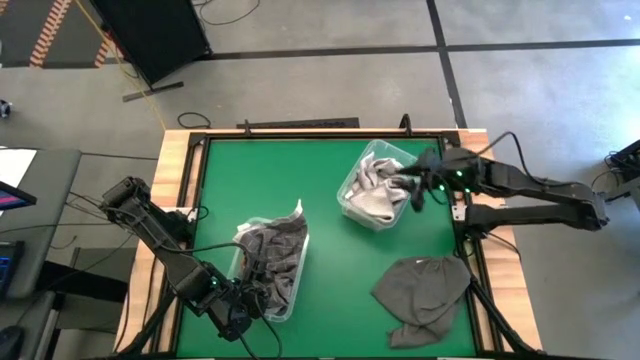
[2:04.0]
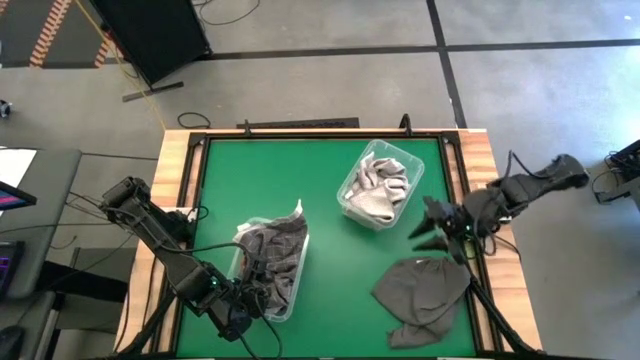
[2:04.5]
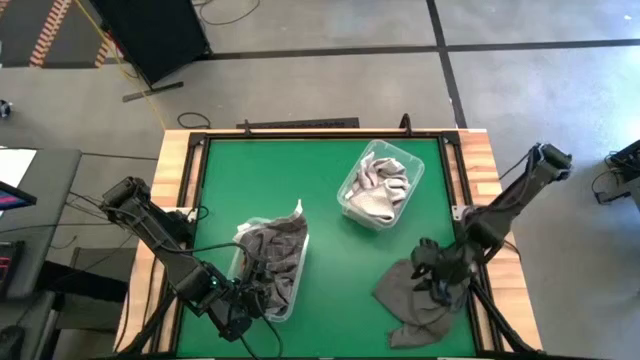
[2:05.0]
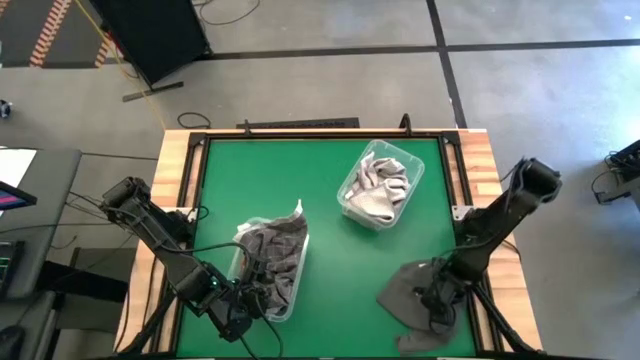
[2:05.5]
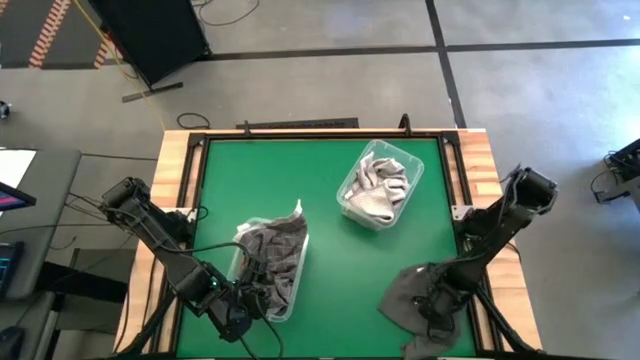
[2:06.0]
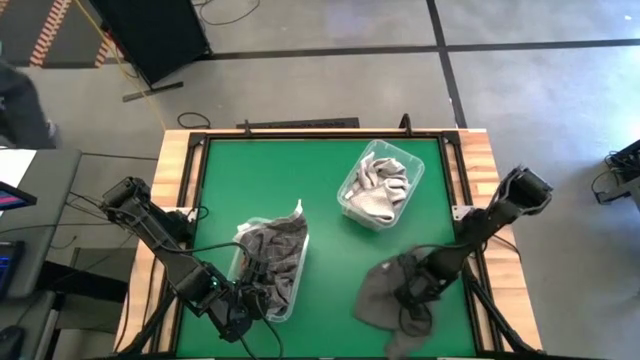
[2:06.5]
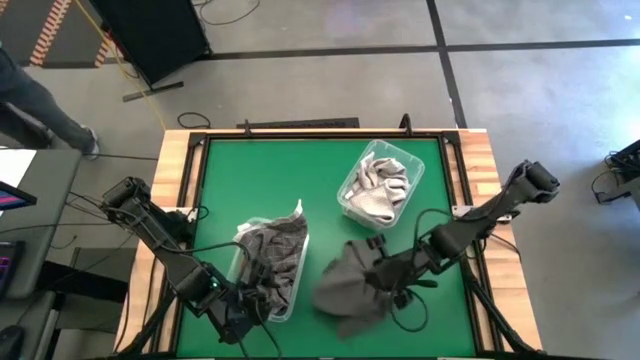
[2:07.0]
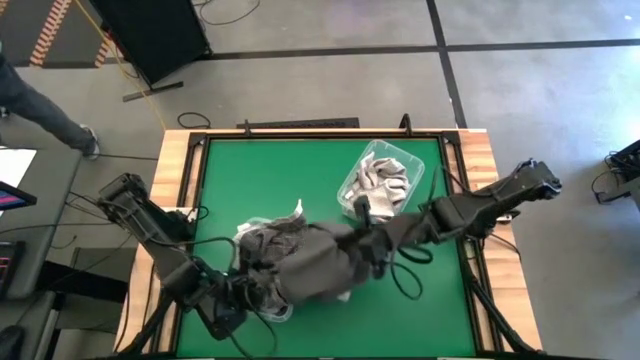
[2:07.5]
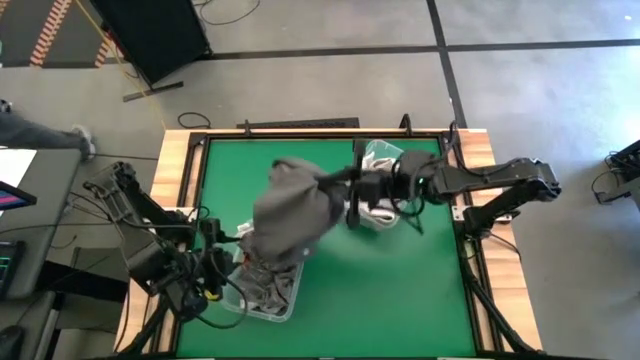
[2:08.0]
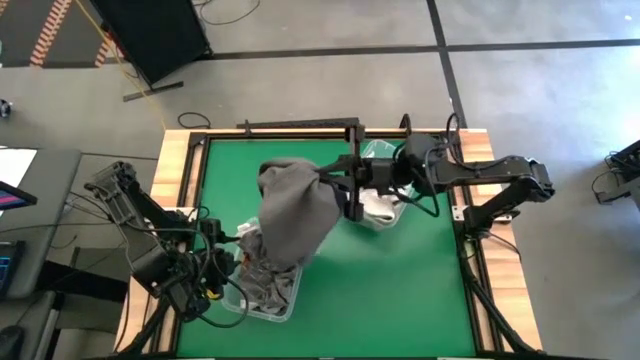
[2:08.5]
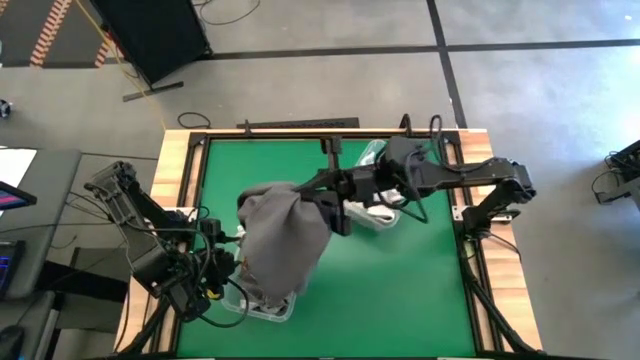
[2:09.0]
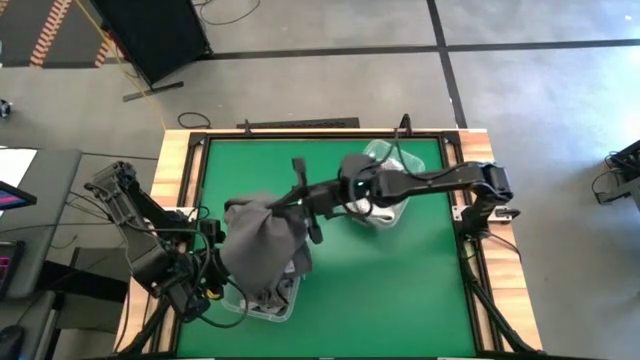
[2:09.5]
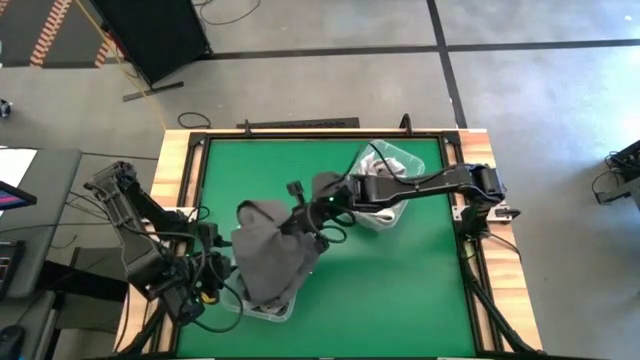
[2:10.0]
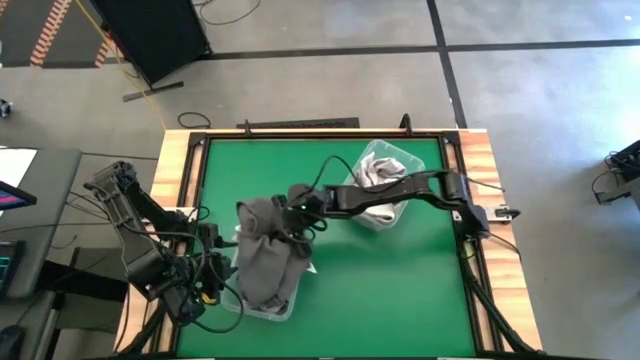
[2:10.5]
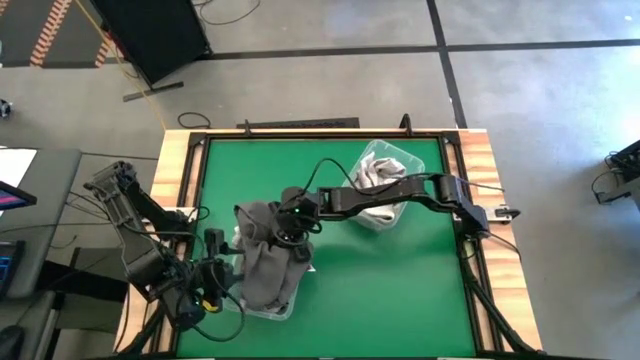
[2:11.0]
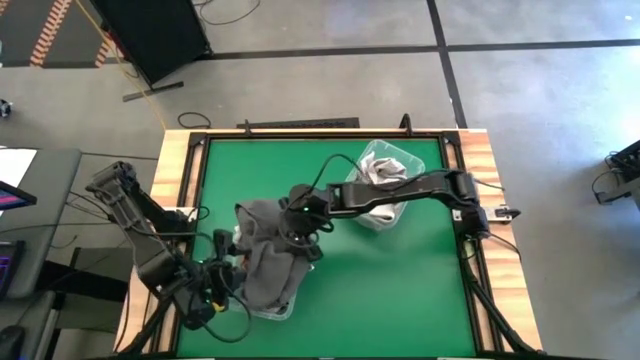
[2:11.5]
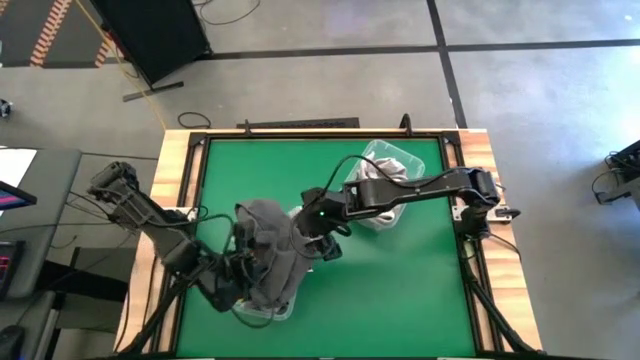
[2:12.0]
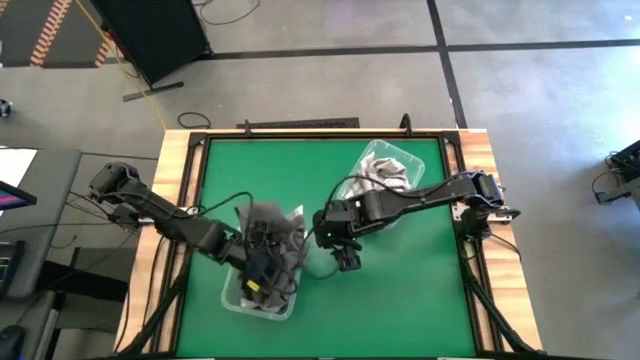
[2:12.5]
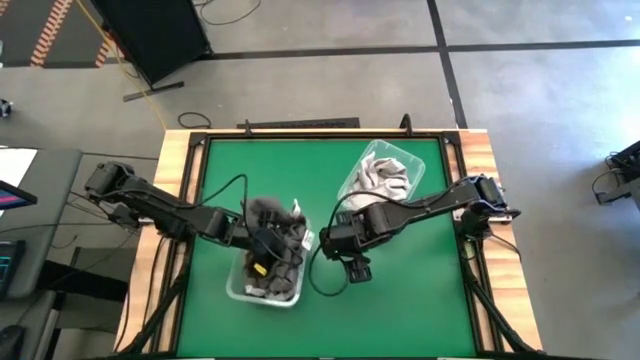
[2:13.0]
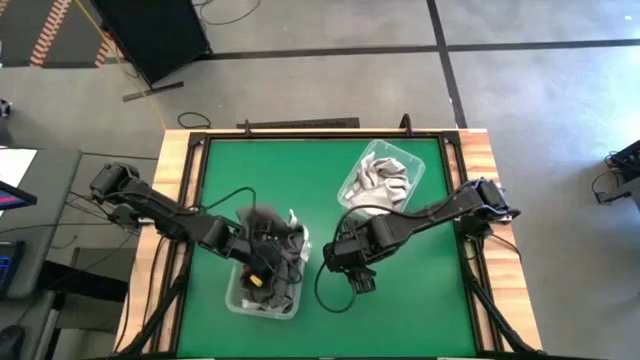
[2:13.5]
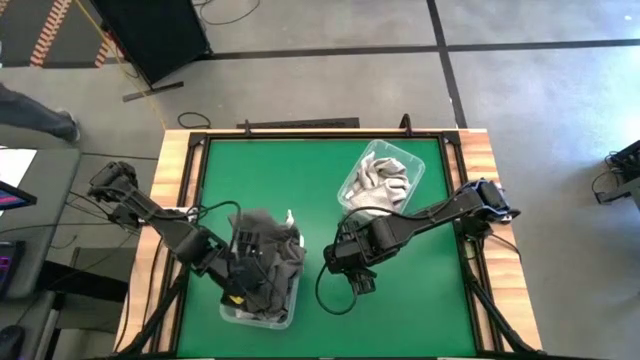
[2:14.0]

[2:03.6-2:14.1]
Task: Sort towels by color in basket
Put the black towel into the bottom transparent bin

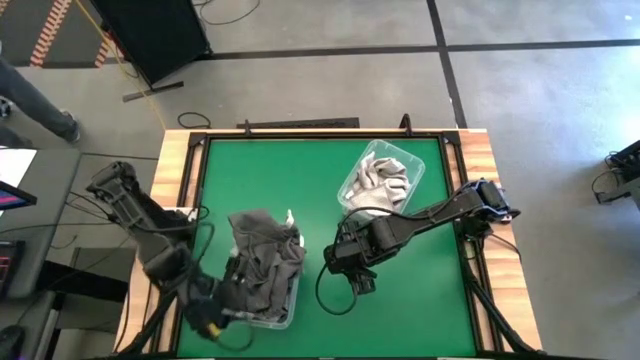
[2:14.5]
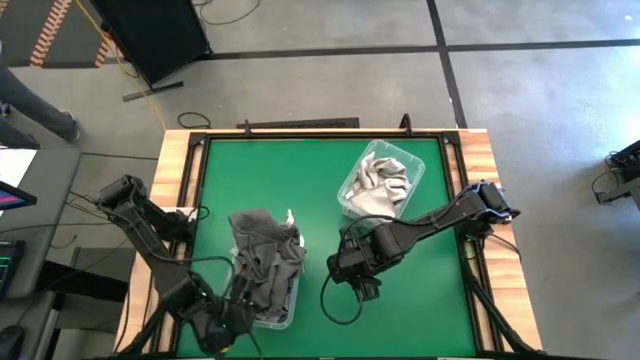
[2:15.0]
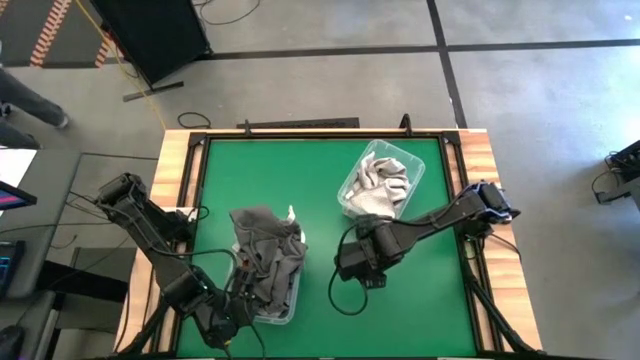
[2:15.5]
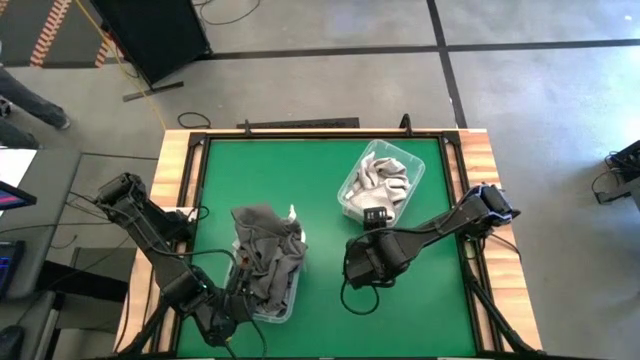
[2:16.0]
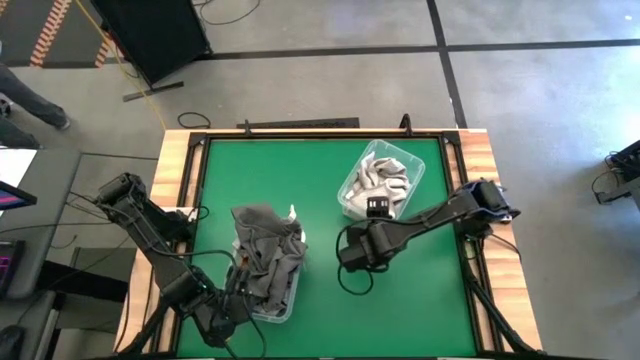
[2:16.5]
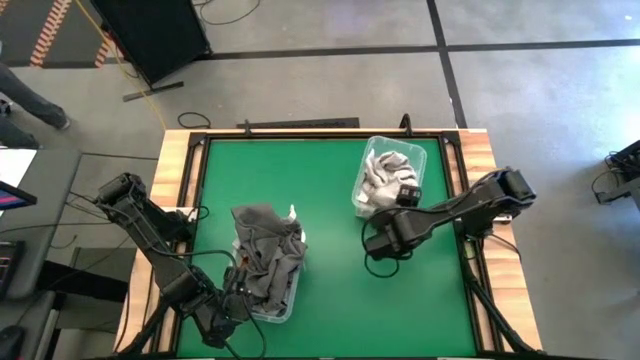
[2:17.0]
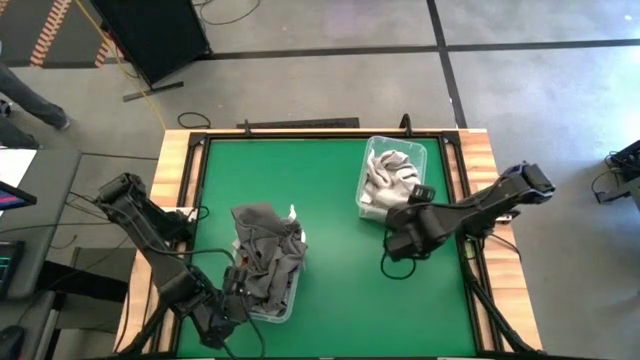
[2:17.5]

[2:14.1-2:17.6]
Adjust the transparent bins

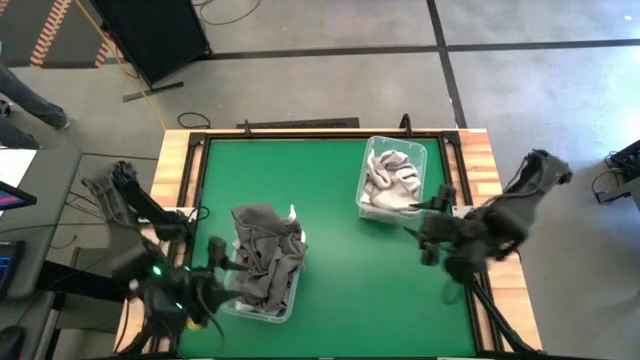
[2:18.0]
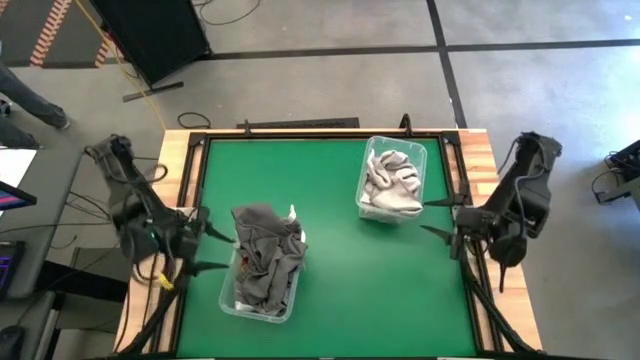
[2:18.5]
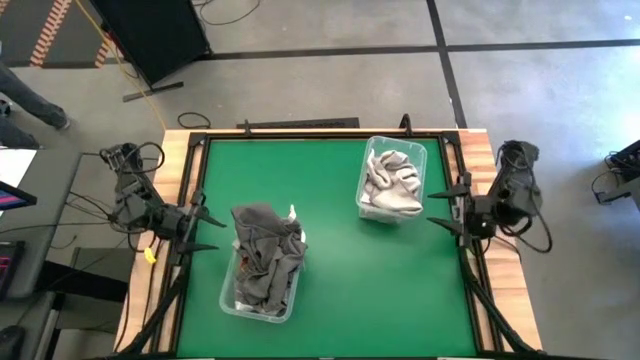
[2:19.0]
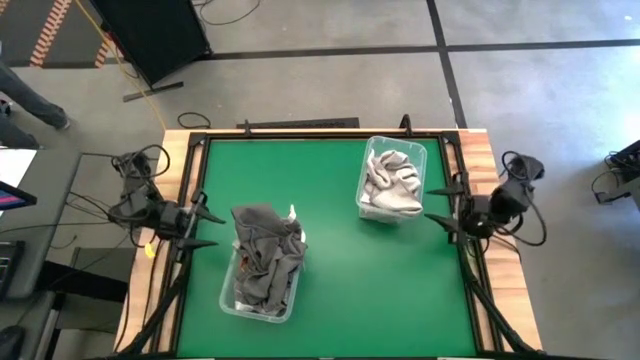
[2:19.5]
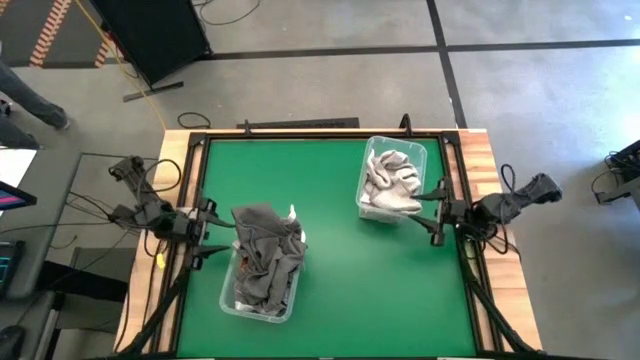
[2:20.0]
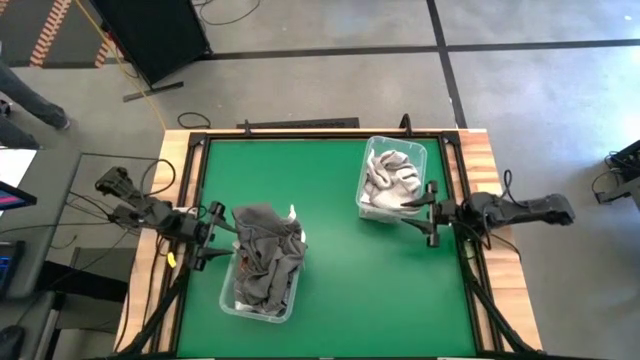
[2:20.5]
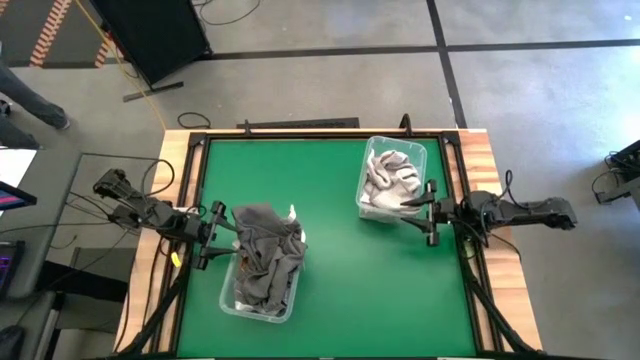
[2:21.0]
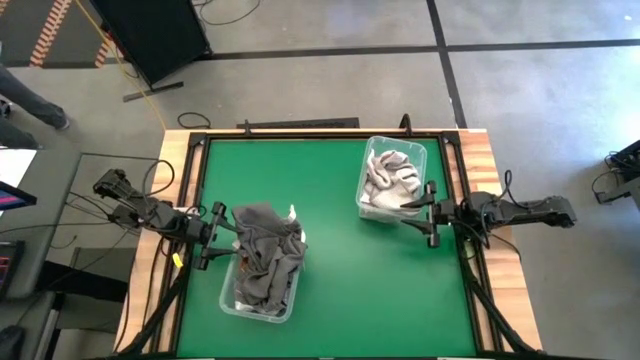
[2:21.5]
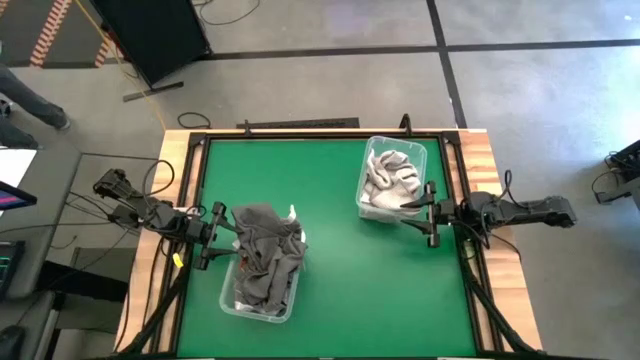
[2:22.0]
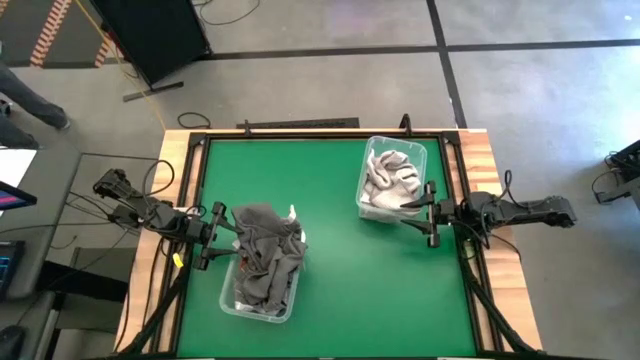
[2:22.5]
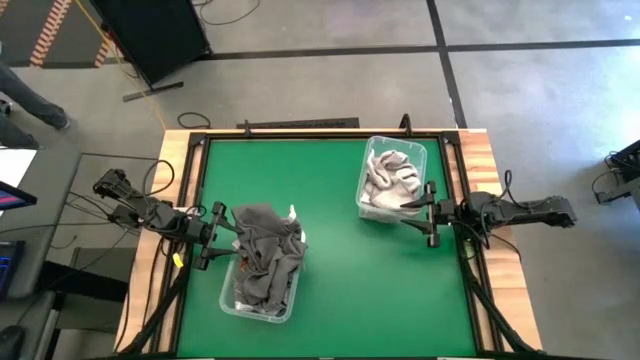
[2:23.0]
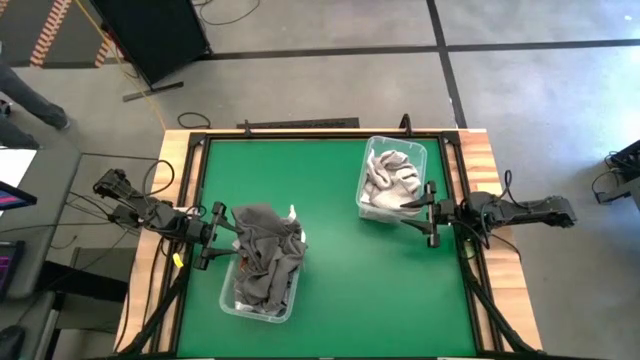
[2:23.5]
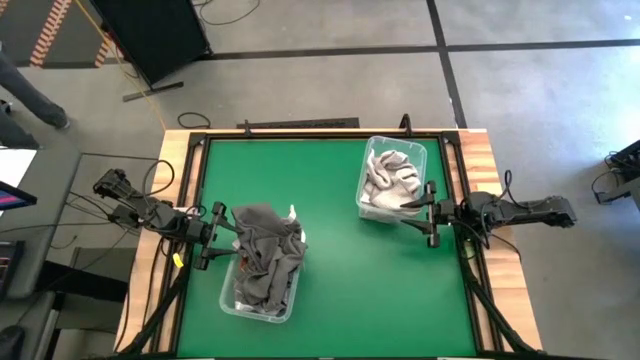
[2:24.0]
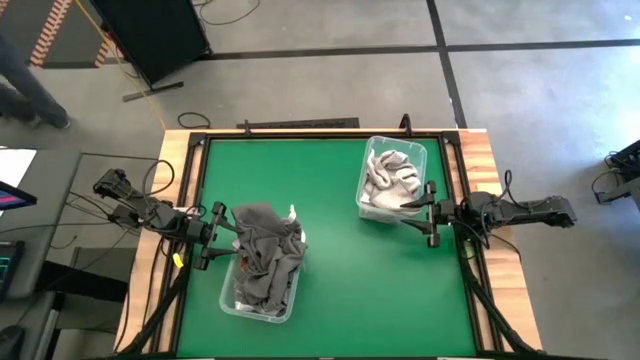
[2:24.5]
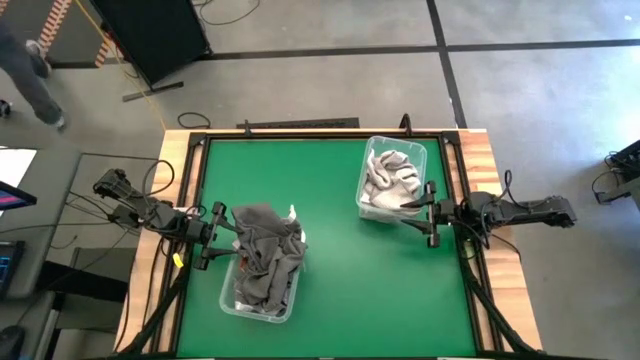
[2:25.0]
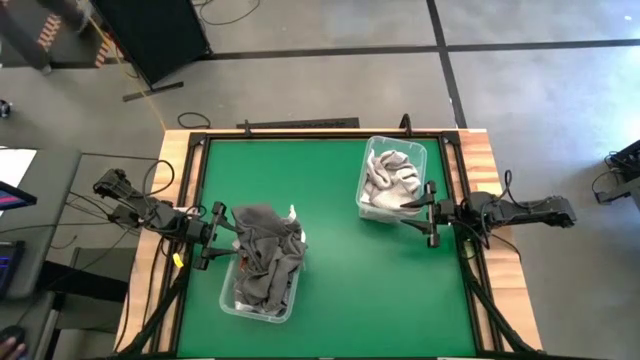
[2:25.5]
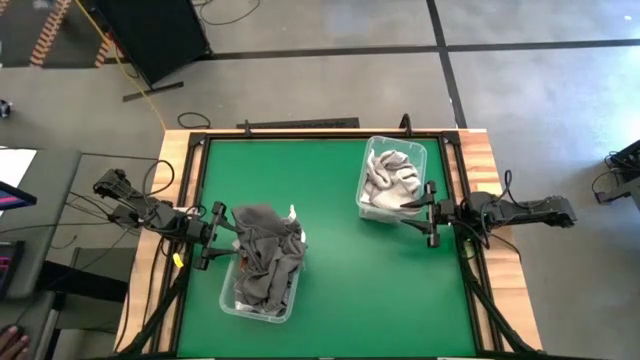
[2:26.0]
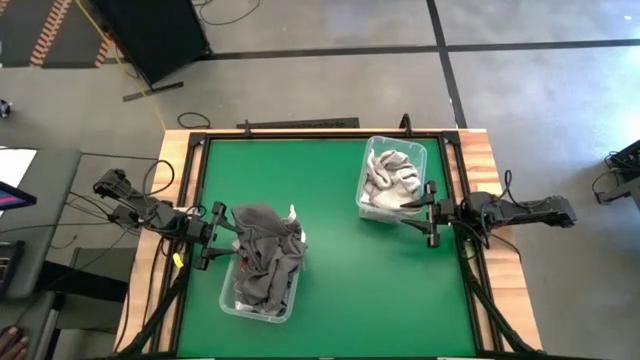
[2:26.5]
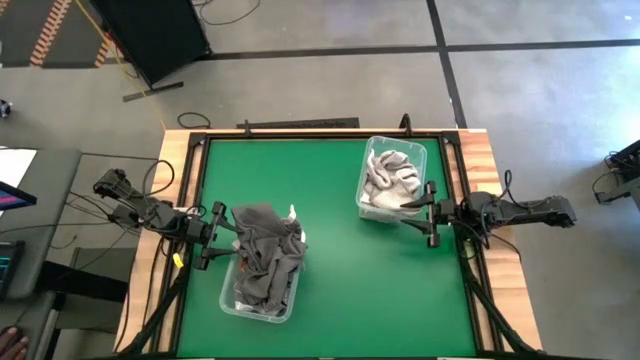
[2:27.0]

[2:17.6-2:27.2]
Return to Home Position
